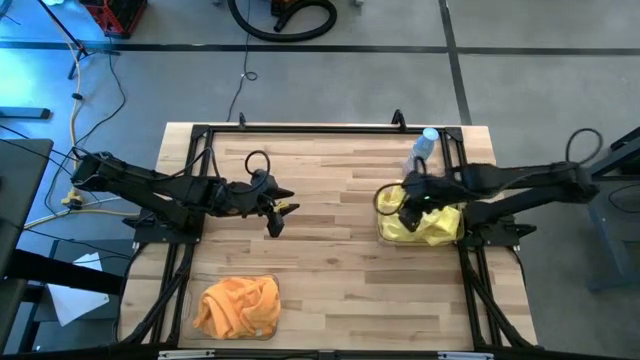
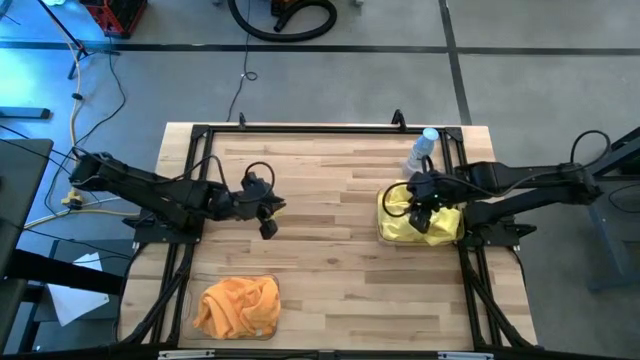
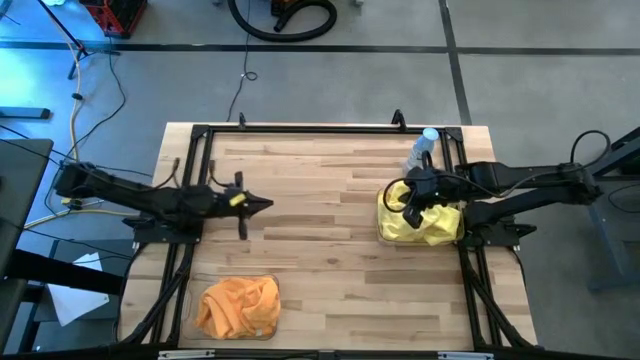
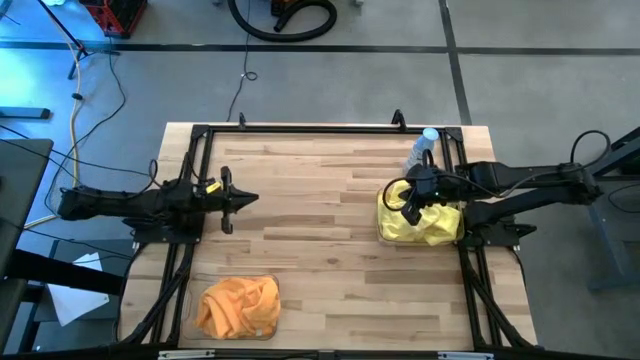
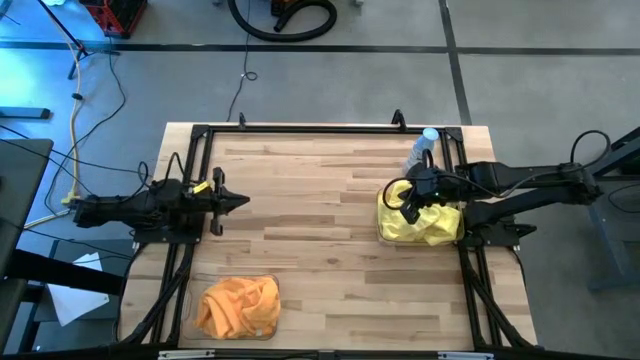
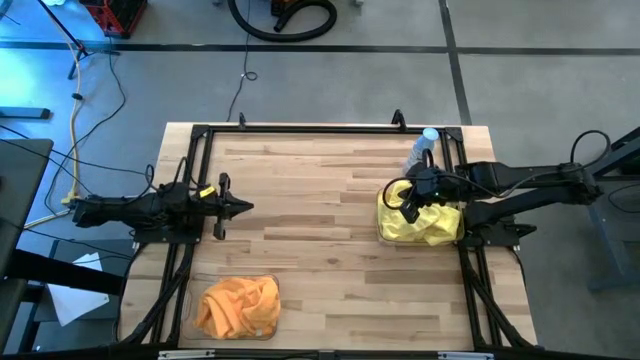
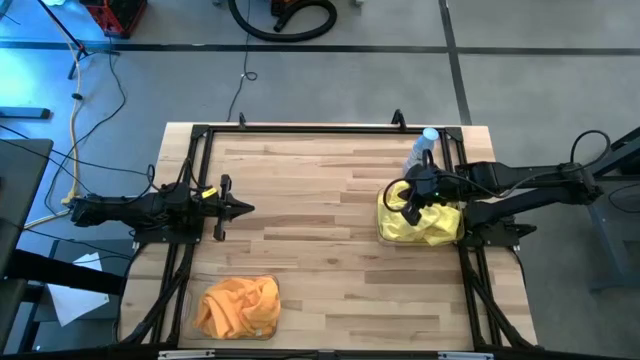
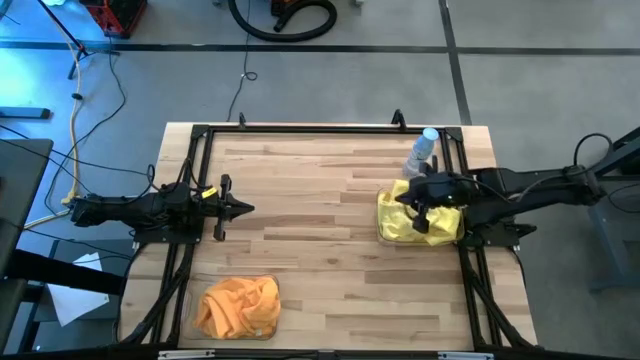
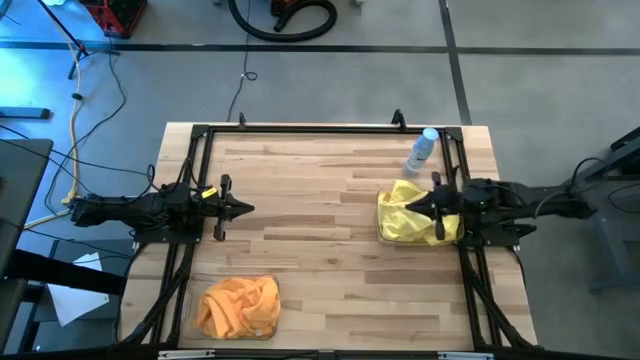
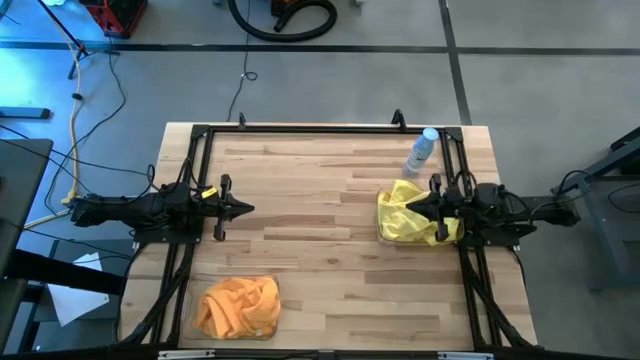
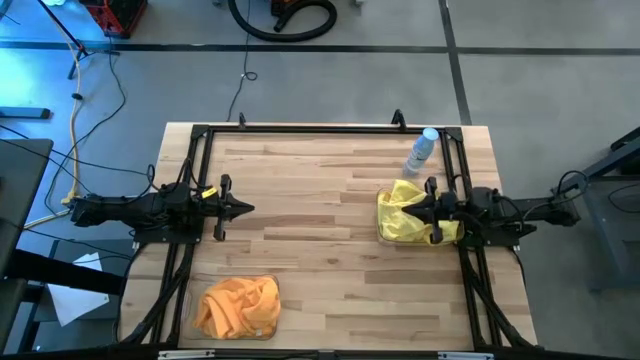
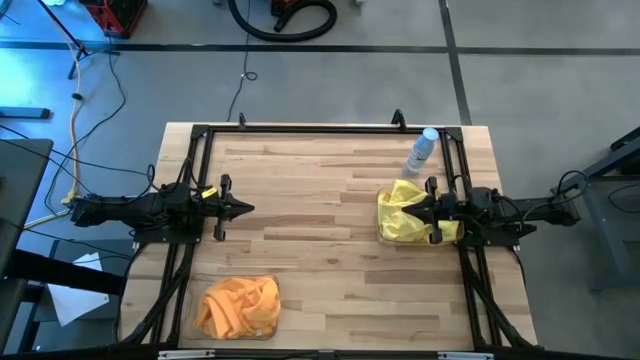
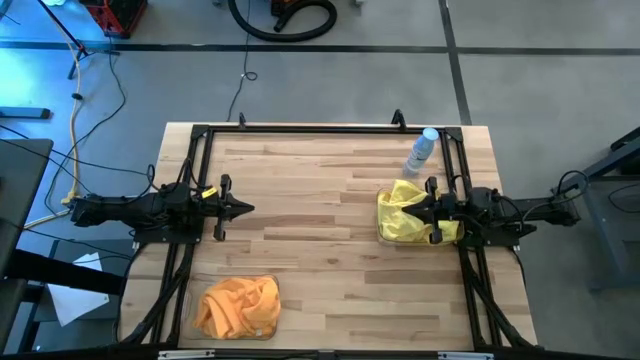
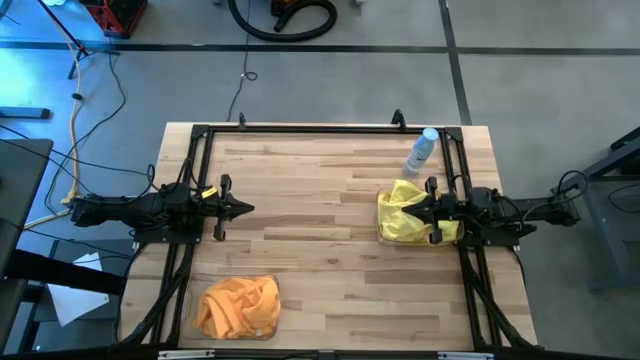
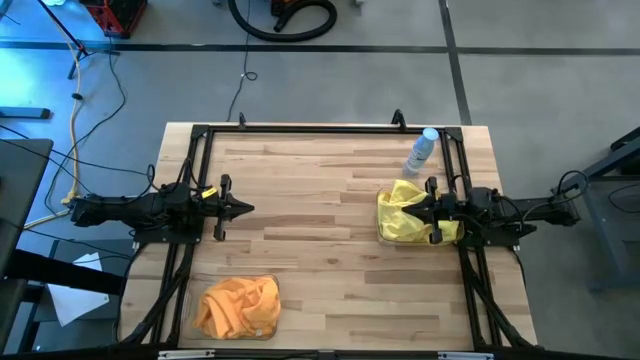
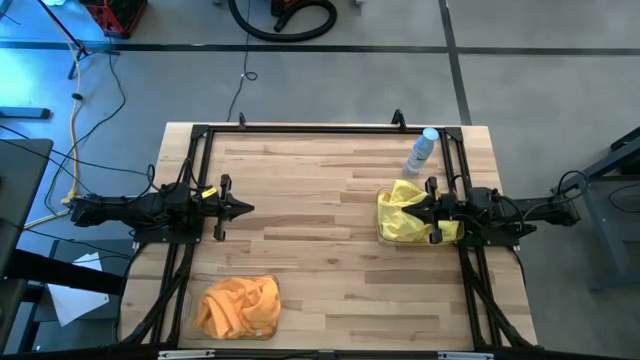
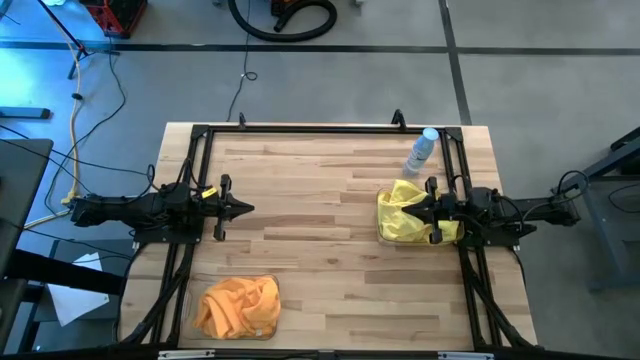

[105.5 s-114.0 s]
Task: Sort microfiber towel by color & place in baskets
Return to Home Position

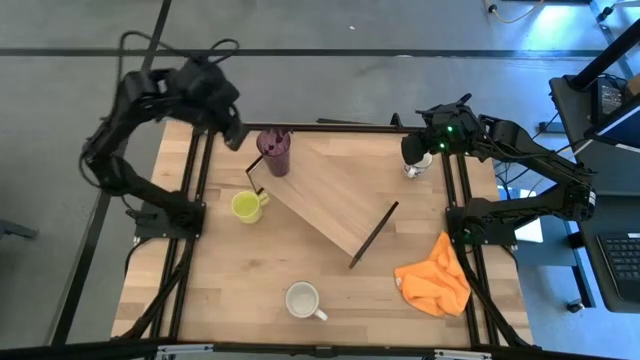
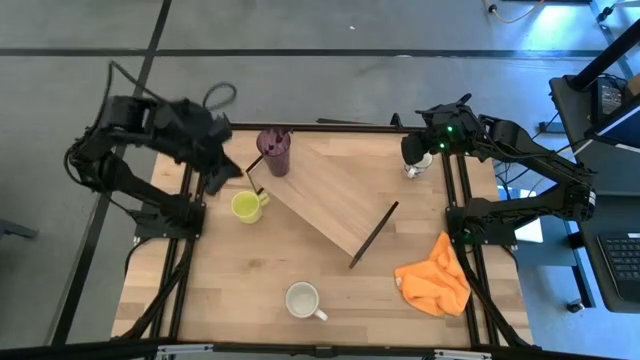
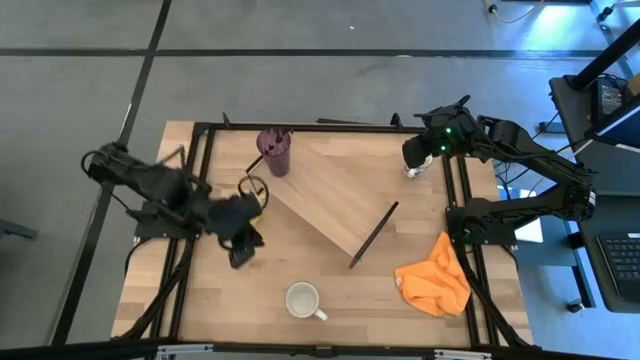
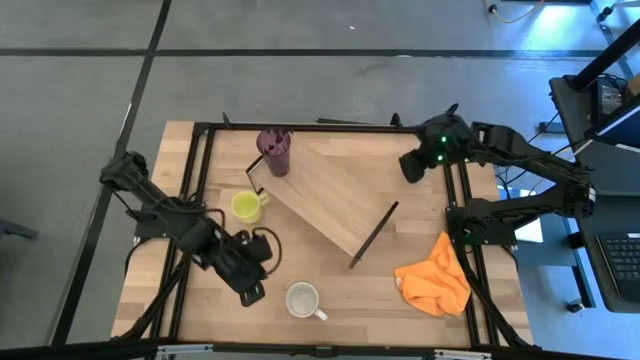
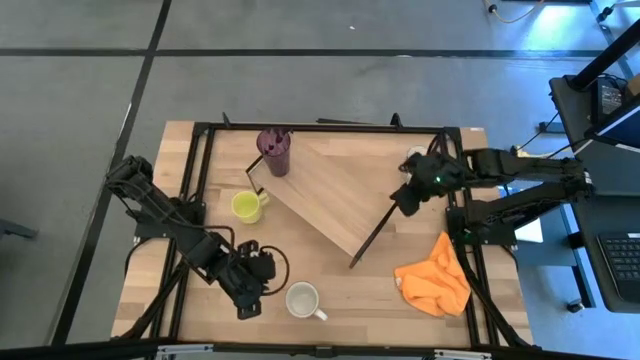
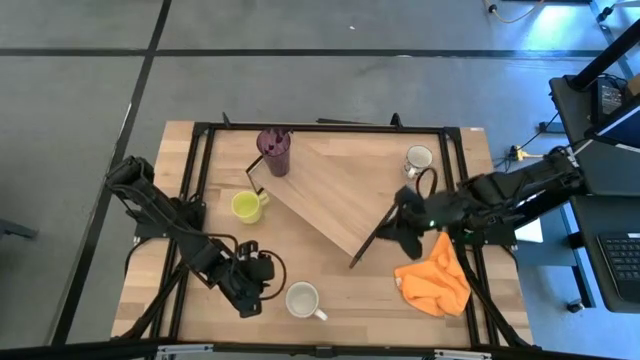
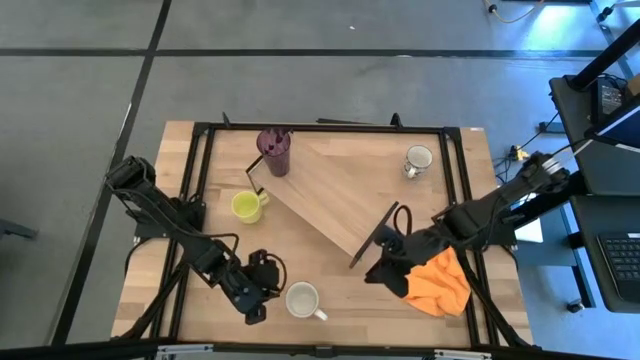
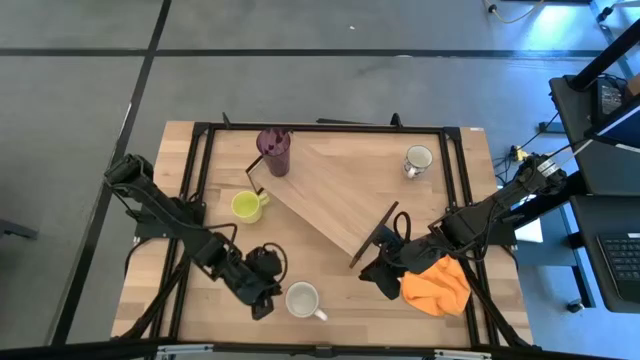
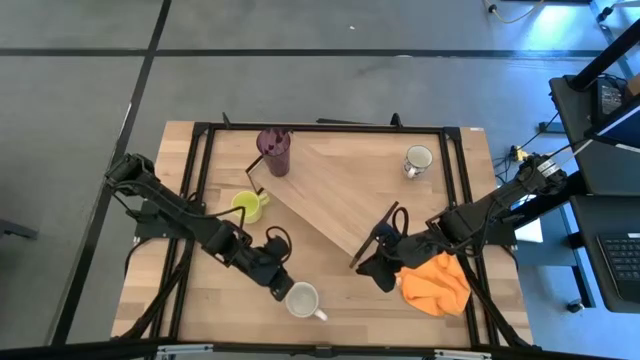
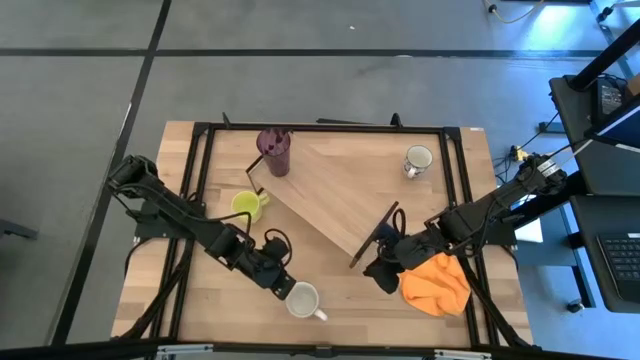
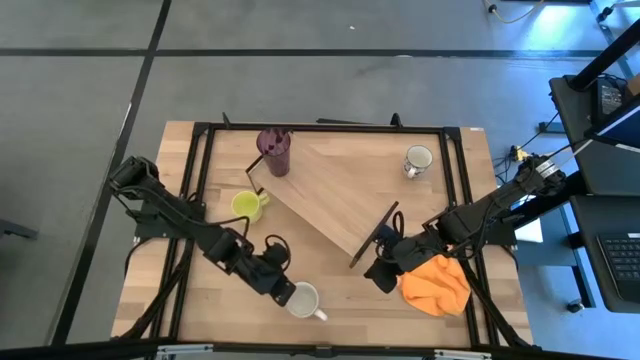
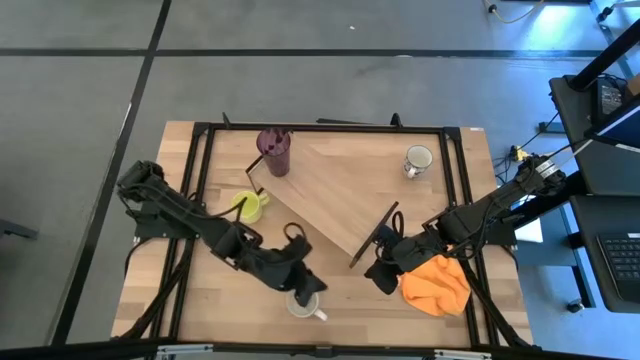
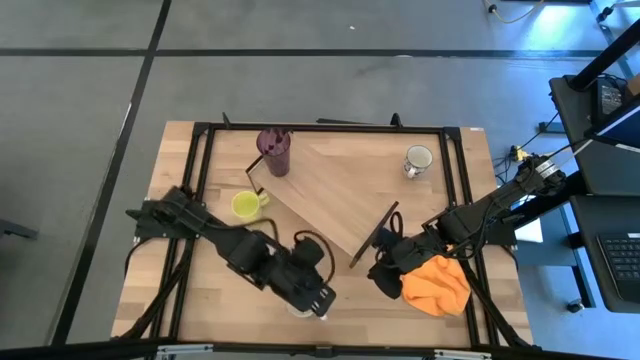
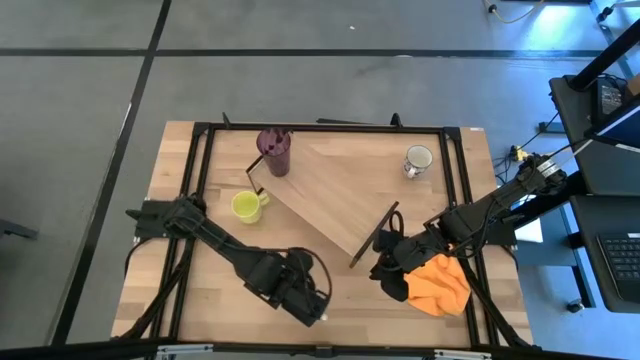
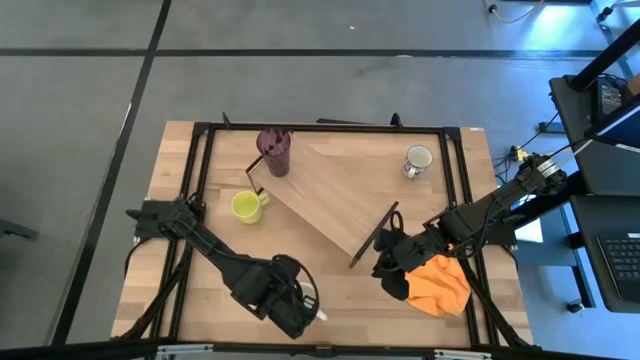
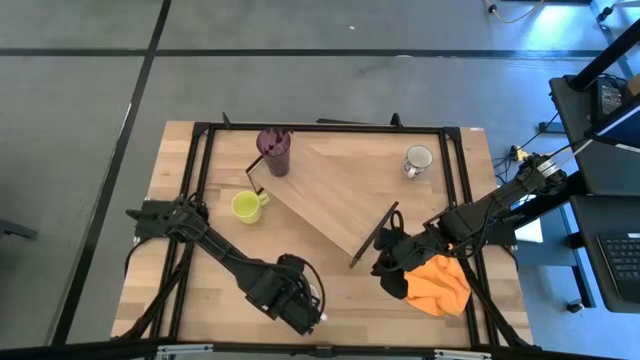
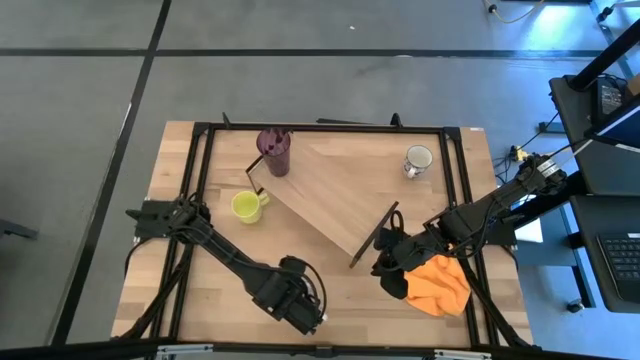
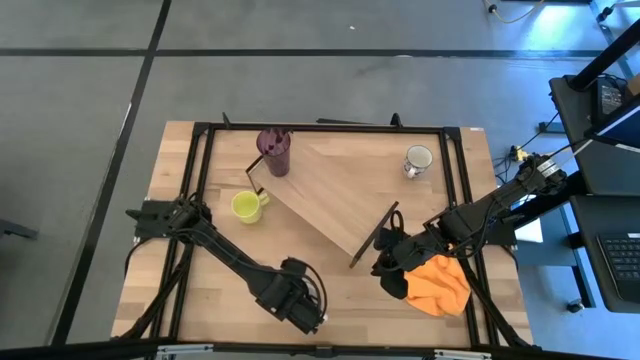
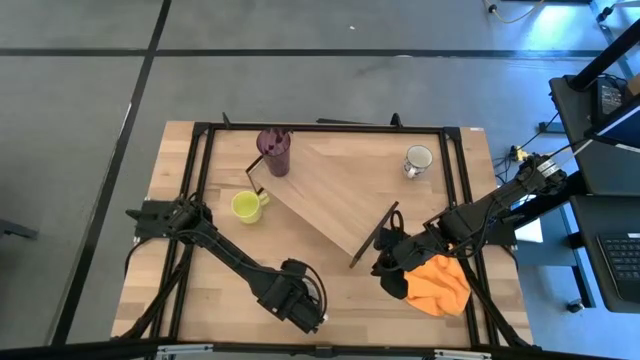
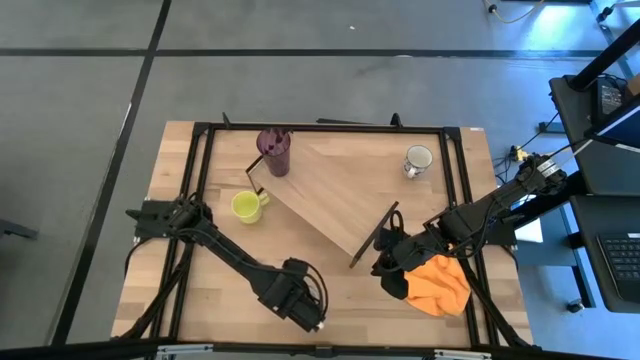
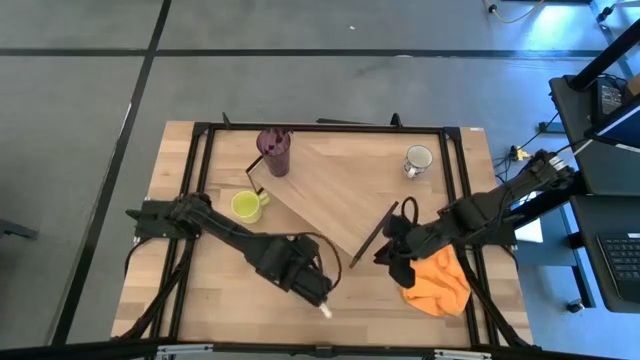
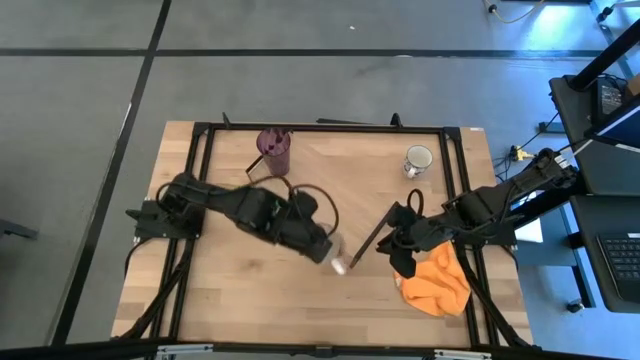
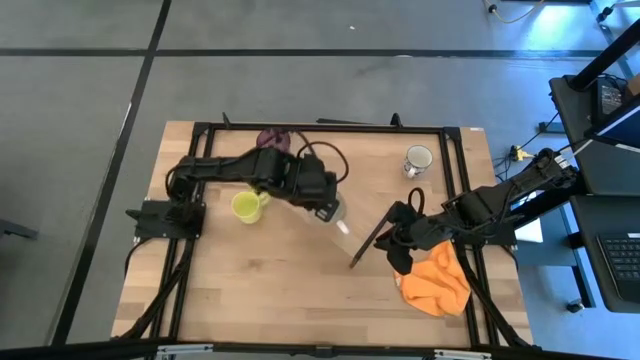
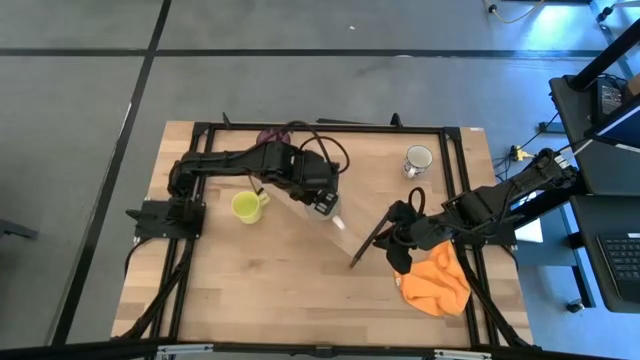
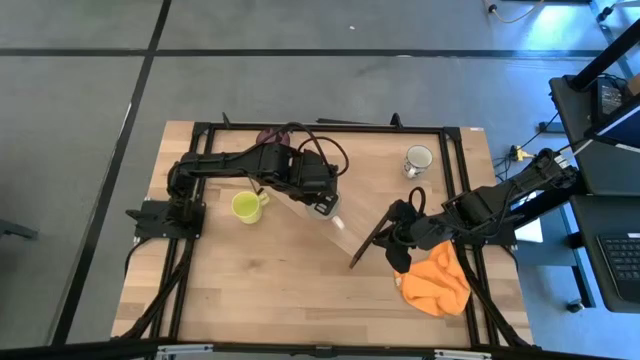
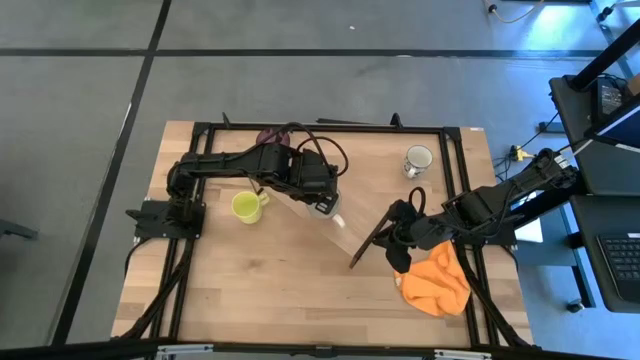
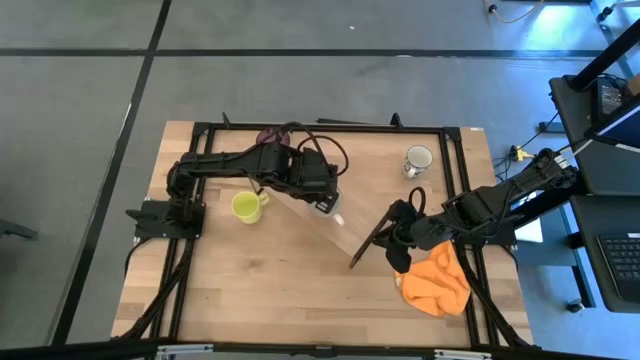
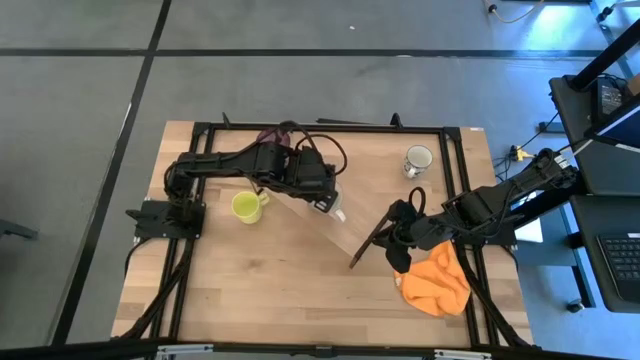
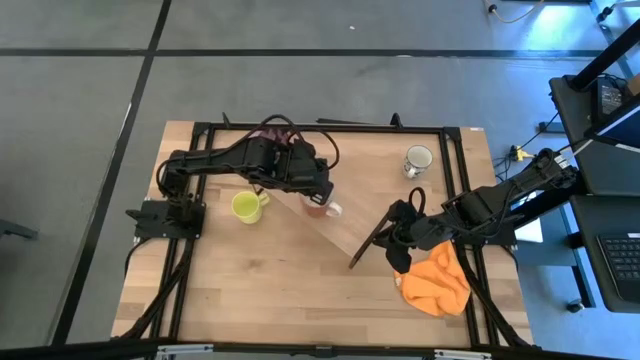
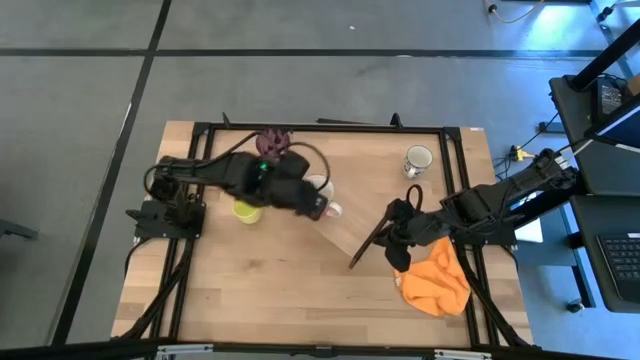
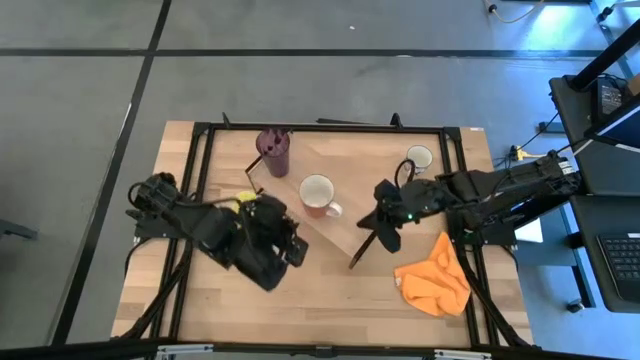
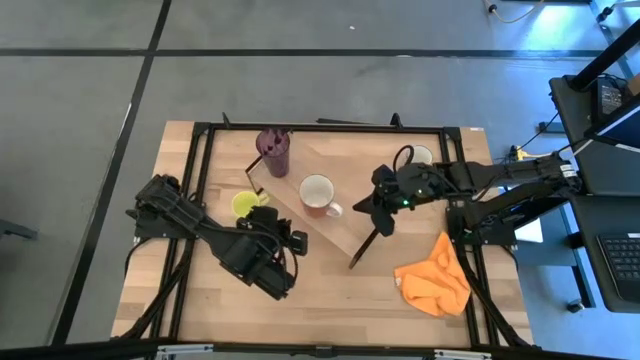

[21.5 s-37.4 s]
Task: Stack small to large cups/mugs on shelf
Put the orange mug on the shelf
